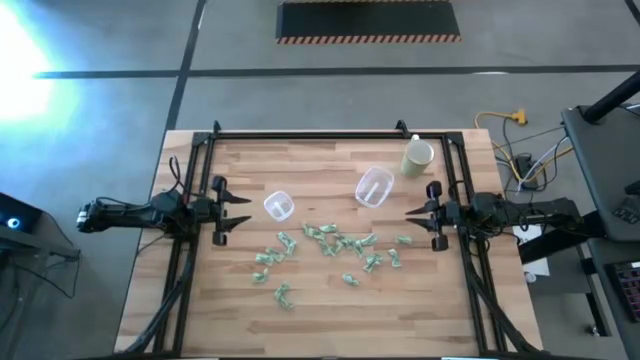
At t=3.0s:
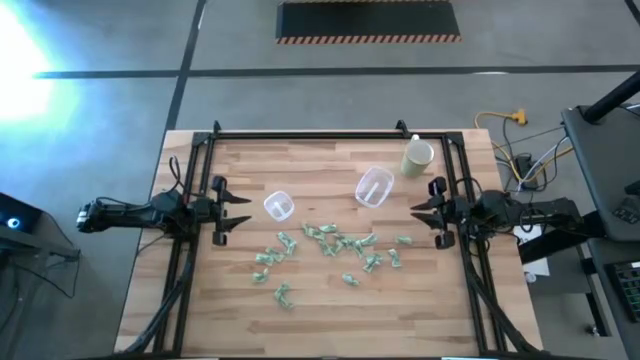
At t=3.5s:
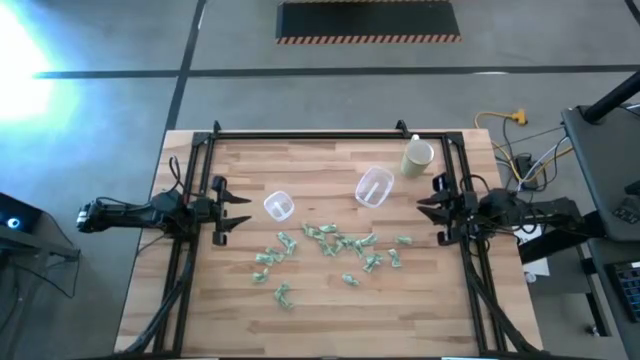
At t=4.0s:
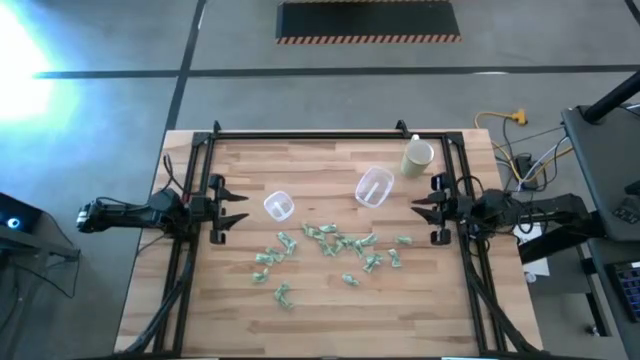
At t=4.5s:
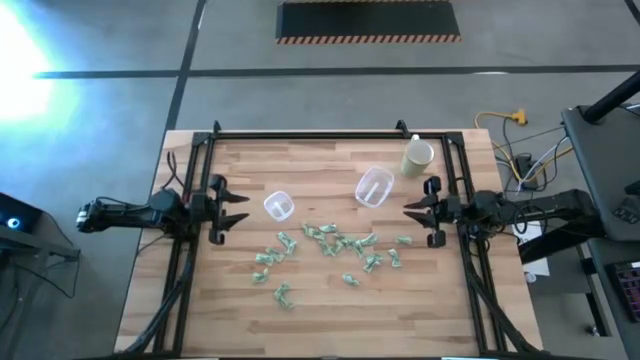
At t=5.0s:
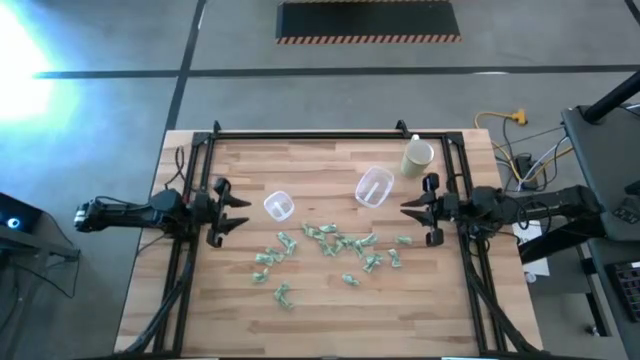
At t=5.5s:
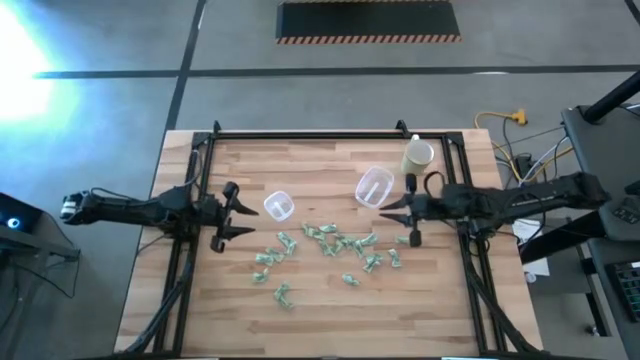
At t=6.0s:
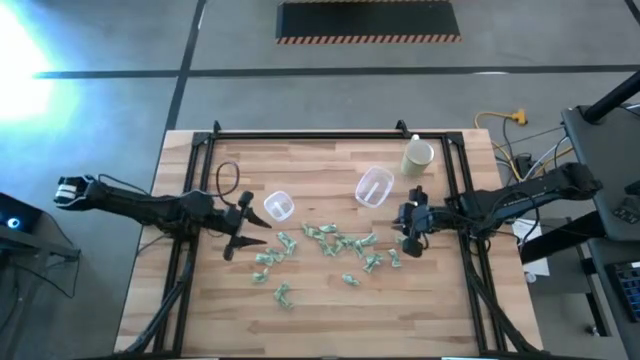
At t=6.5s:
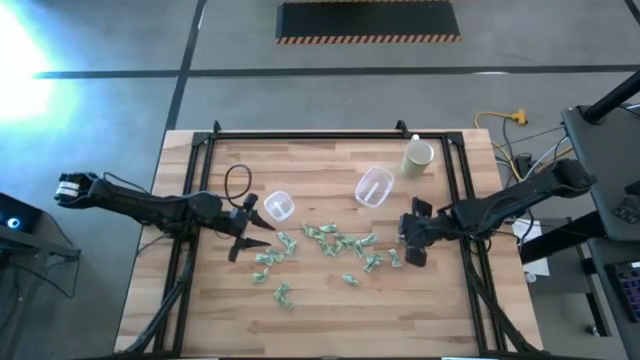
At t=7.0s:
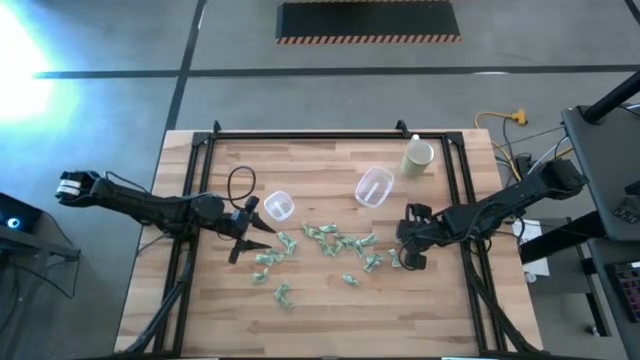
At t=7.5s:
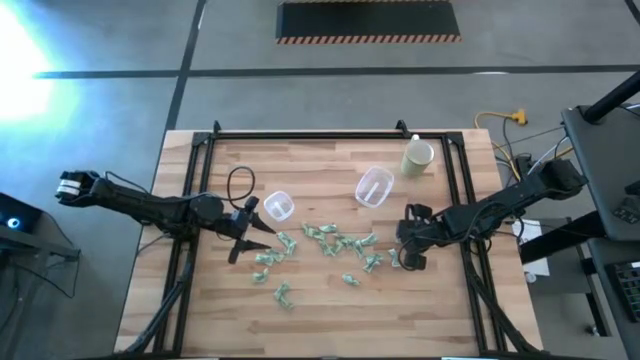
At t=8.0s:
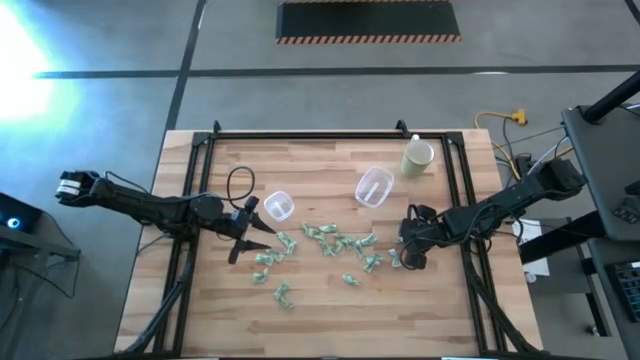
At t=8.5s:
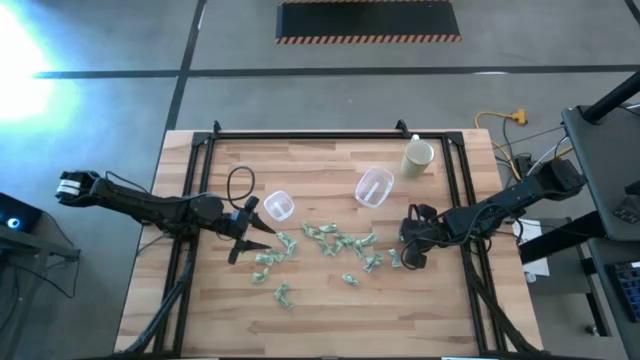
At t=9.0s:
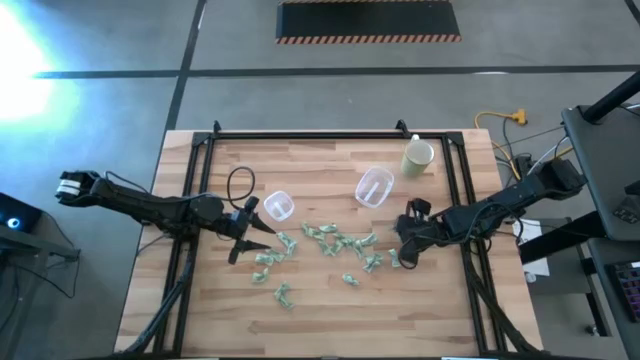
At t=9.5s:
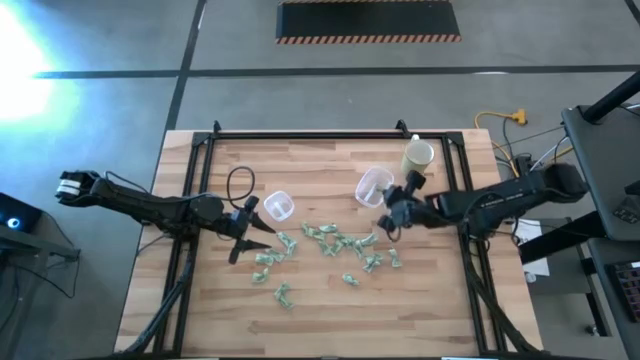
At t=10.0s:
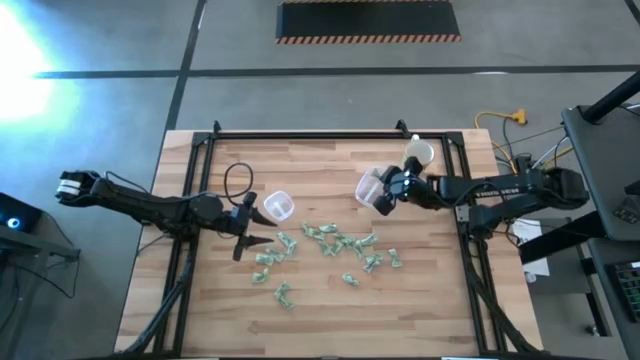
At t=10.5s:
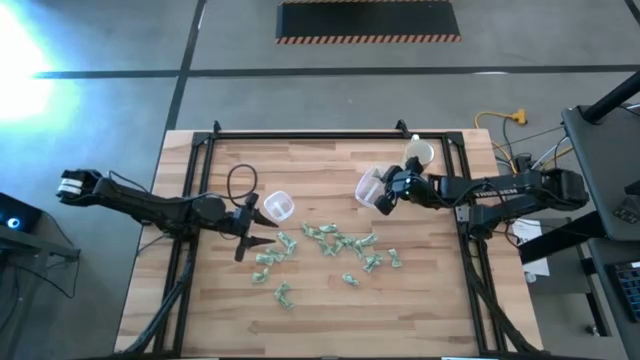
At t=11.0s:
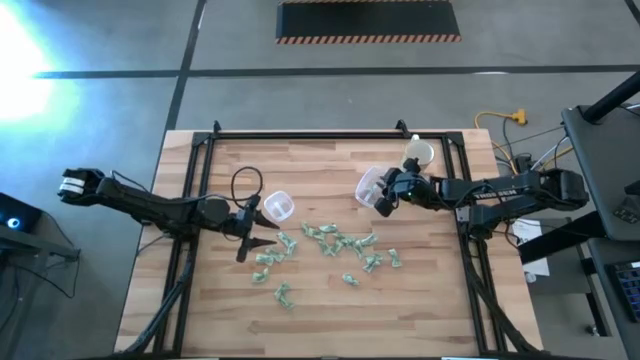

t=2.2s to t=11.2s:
Task: Pick and place items into bin
Put the stevia packet into the right transparent bin

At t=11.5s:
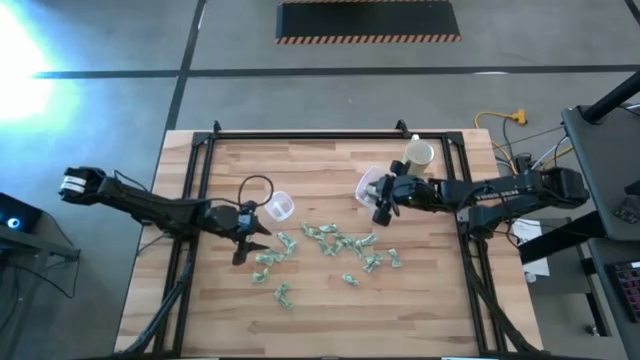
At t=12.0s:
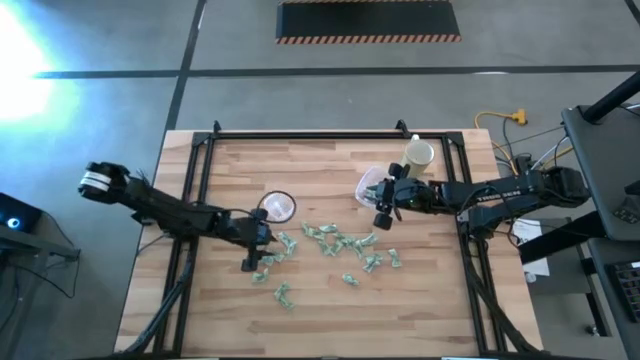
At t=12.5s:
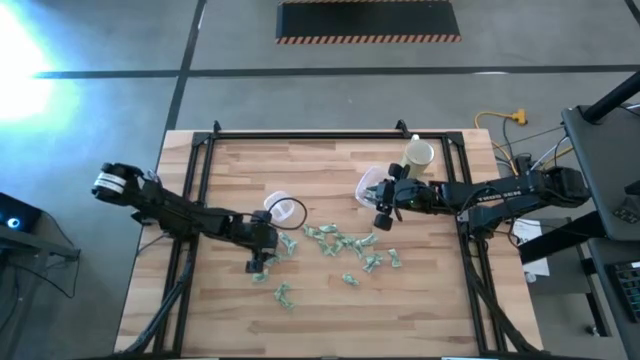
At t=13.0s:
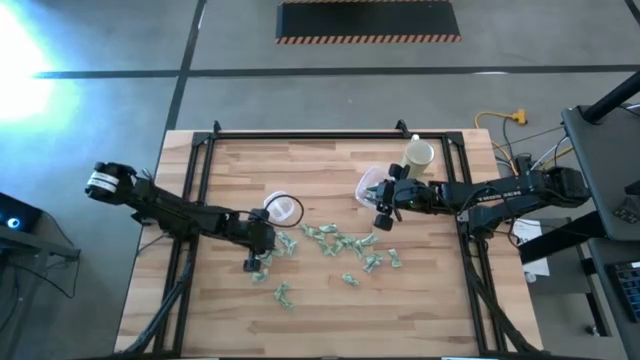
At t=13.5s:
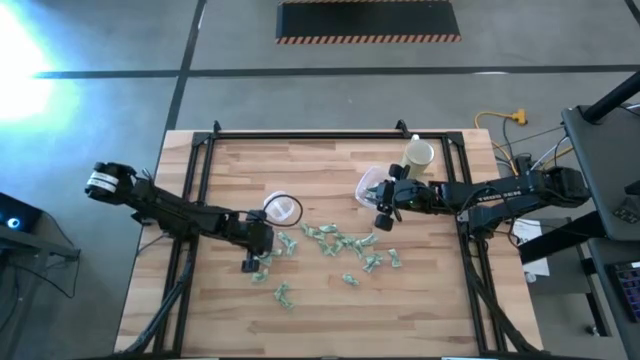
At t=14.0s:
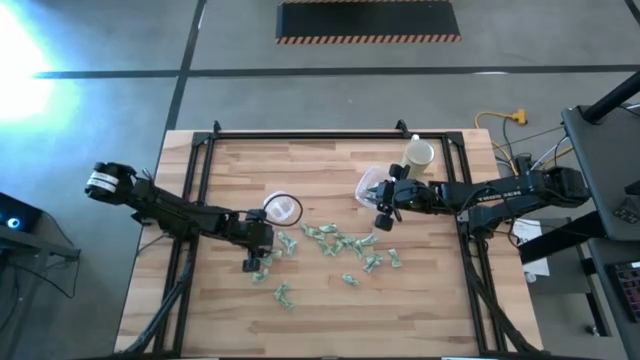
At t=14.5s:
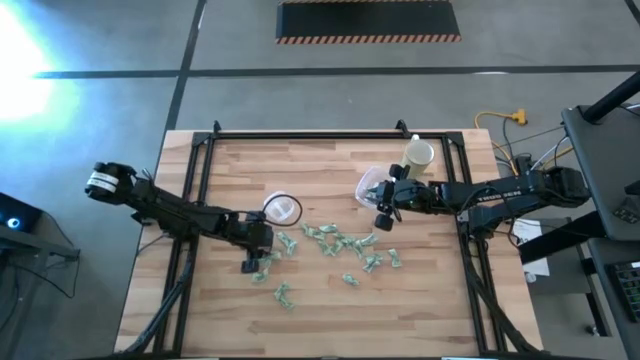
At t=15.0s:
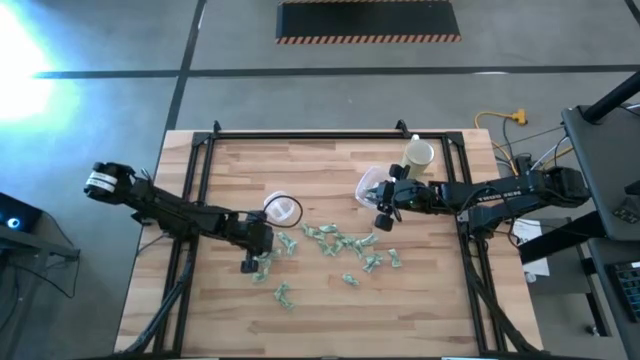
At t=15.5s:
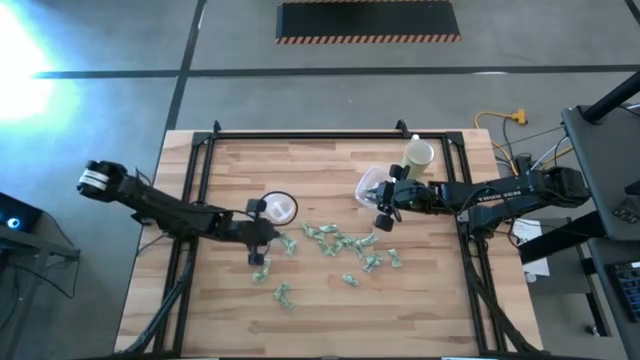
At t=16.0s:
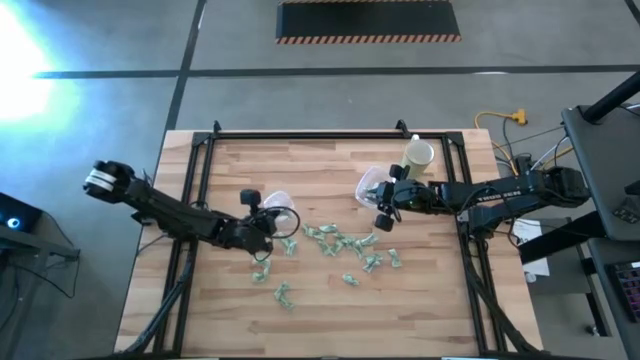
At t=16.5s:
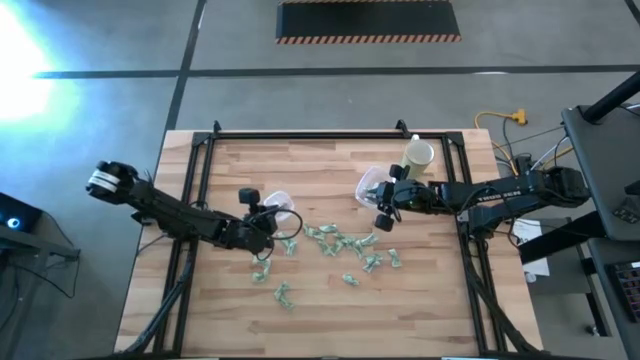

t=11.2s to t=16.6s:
Put the stevia packet into the left transparent bin

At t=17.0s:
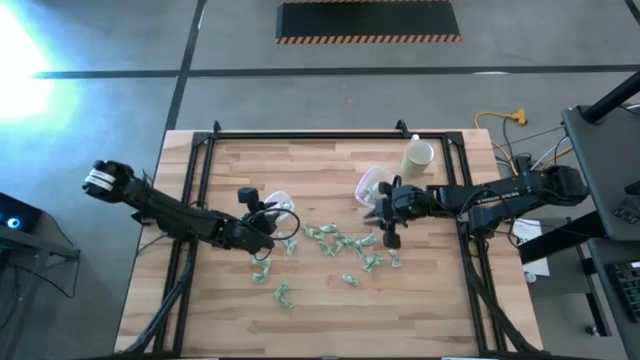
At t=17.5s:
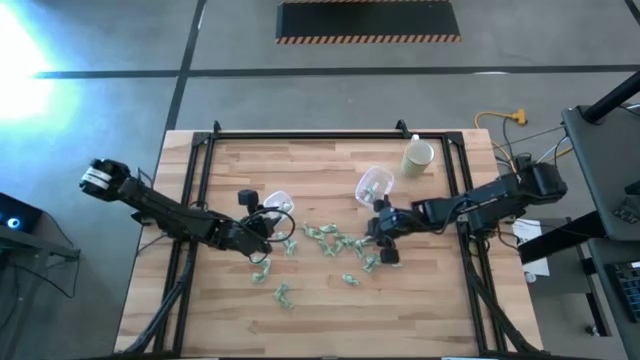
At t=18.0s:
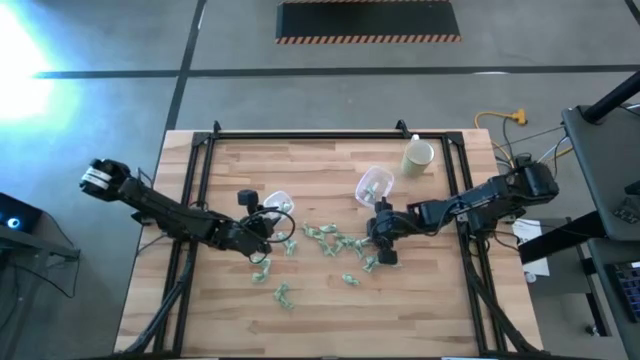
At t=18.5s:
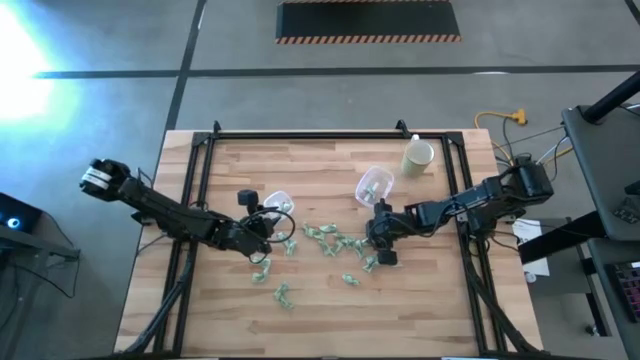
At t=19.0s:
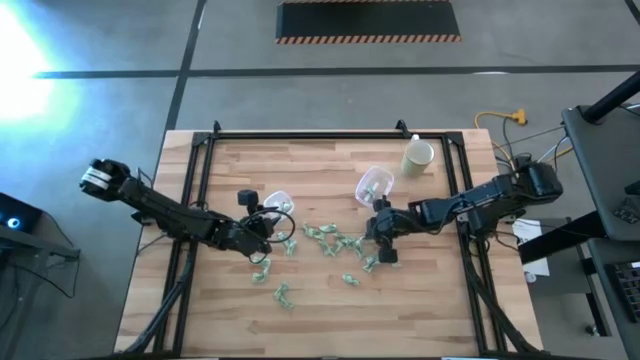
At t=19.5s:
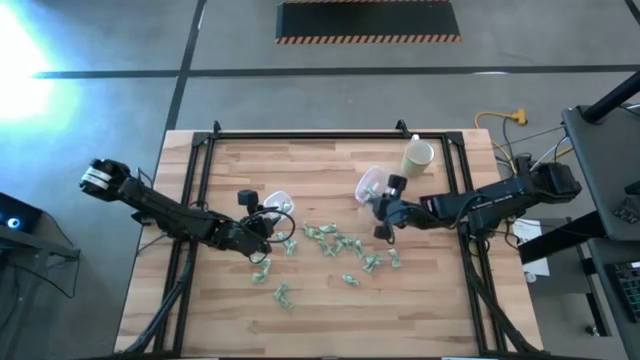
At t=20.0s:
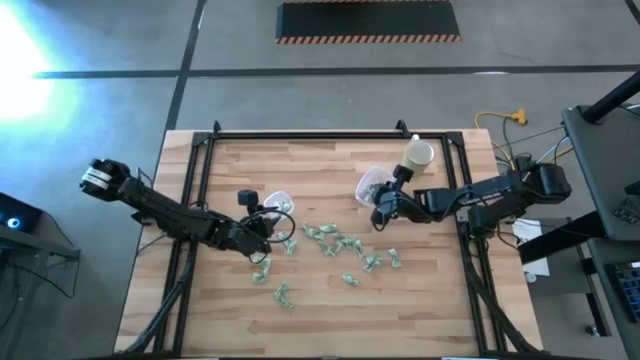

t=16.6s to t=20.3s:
Put the stevia packet into the right transparent bin

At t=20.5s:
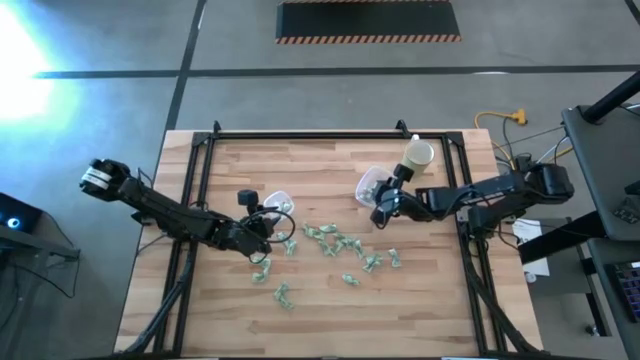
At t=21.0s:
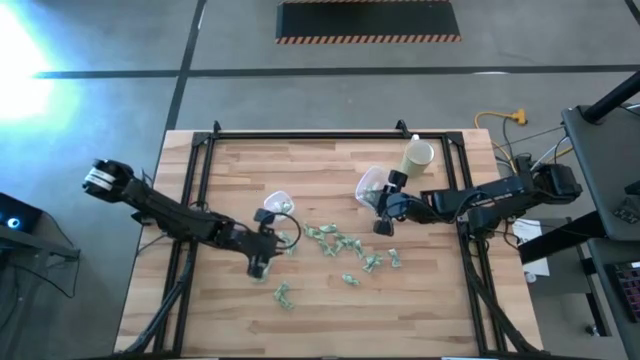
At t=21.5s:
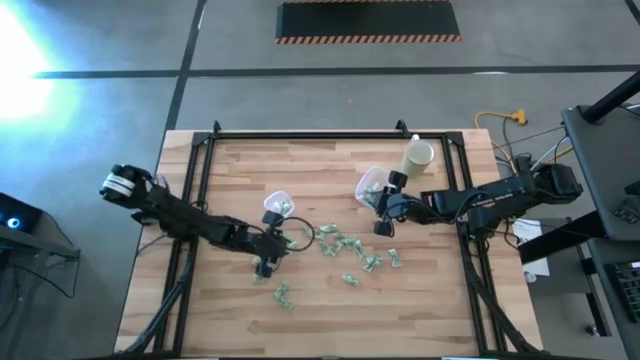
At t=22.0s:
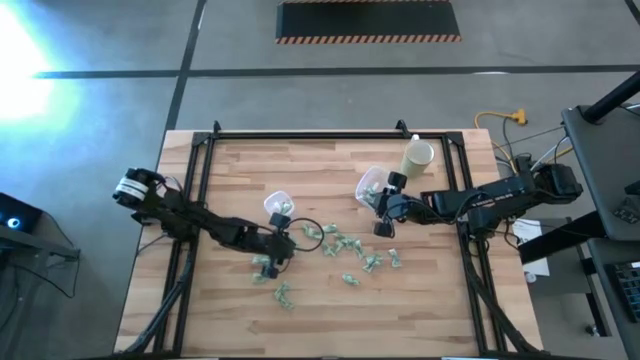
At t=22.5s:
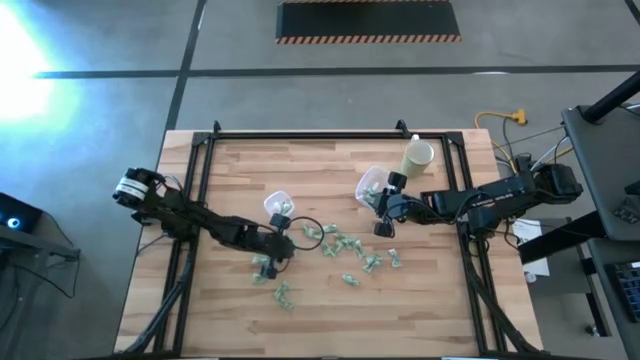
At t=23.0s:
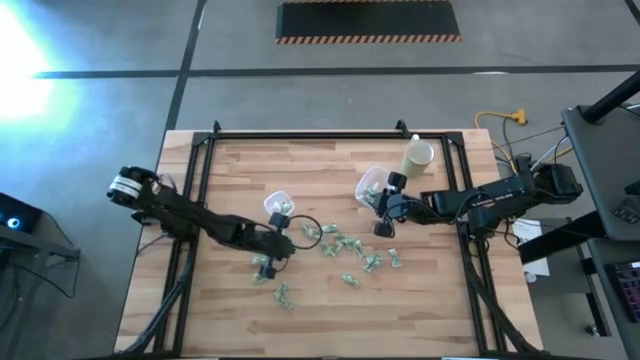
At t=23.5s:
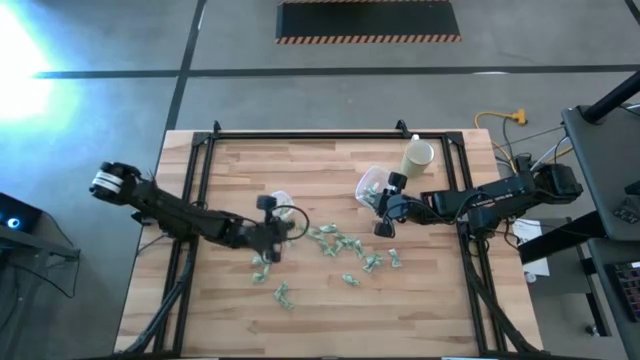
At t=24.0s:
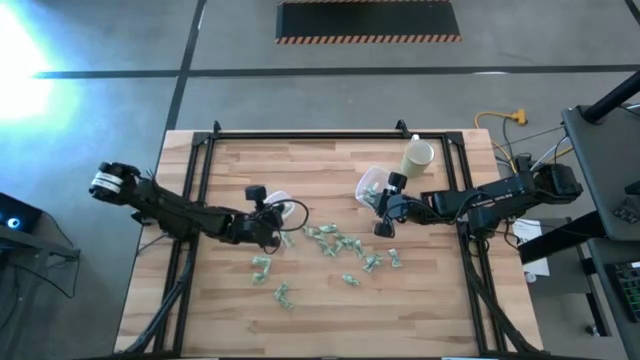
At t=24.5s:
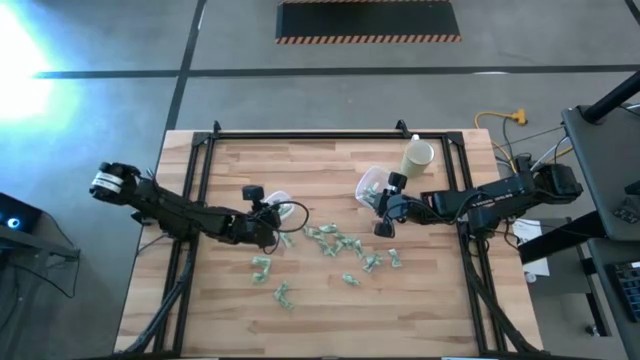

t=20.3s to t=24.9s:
Put the stevia packet into the left transparent bin
